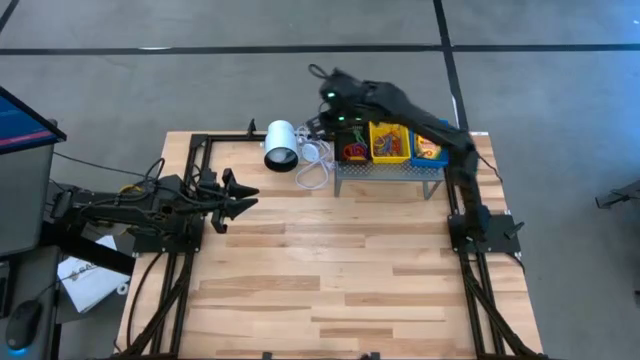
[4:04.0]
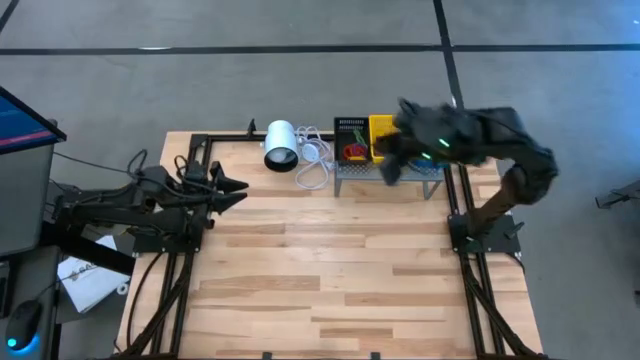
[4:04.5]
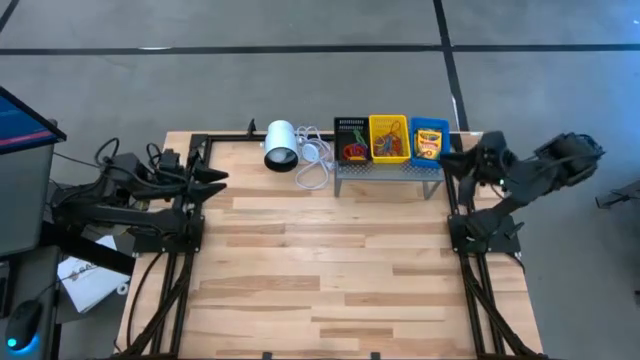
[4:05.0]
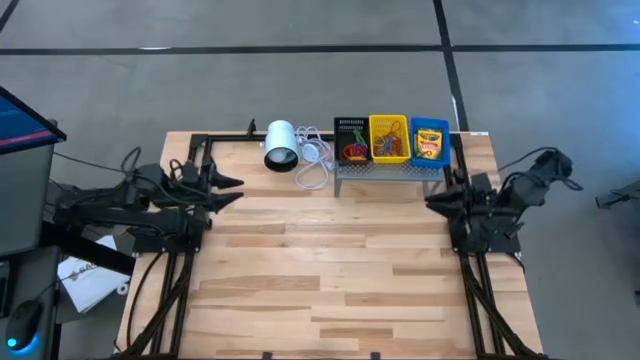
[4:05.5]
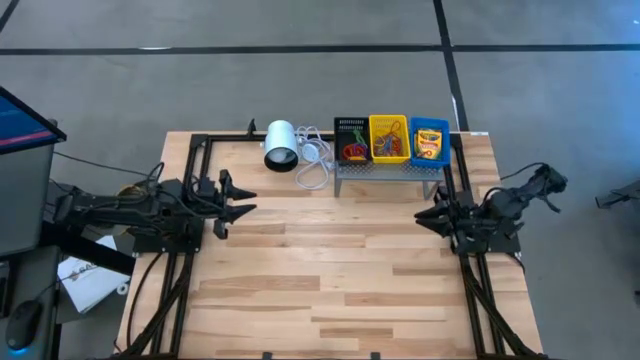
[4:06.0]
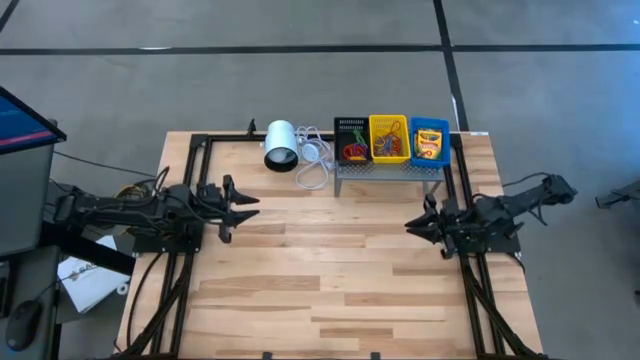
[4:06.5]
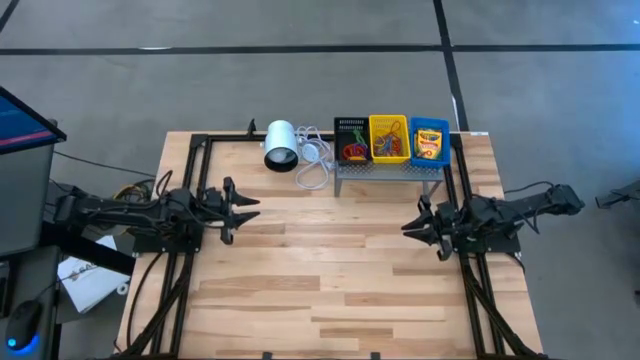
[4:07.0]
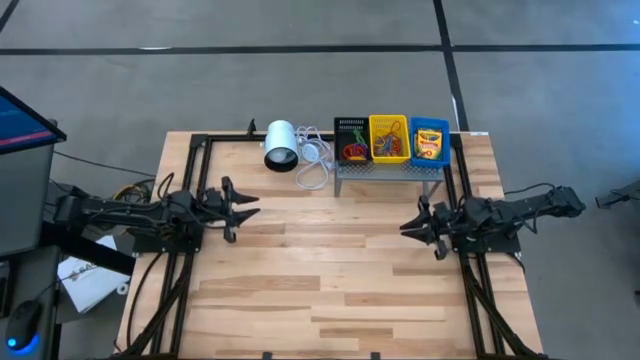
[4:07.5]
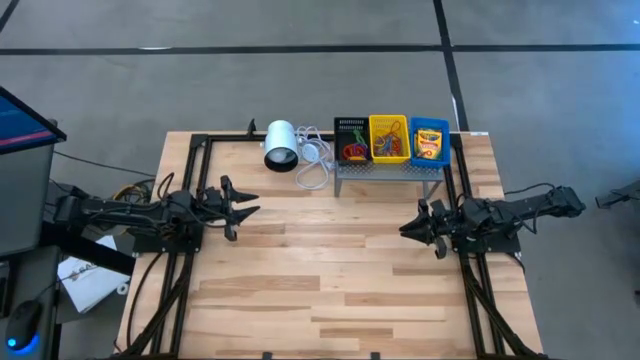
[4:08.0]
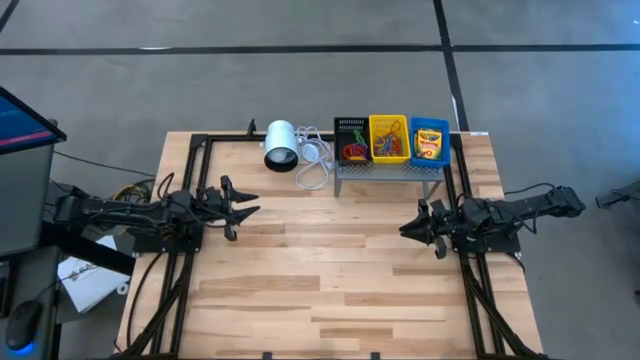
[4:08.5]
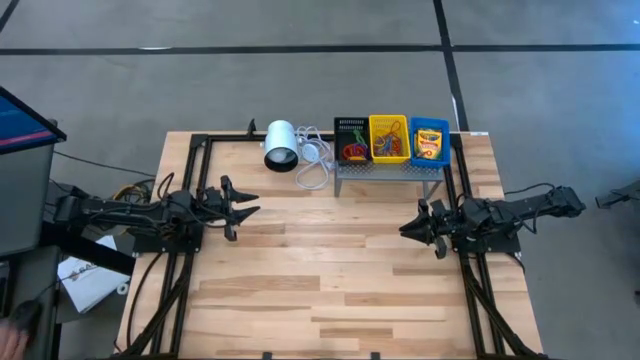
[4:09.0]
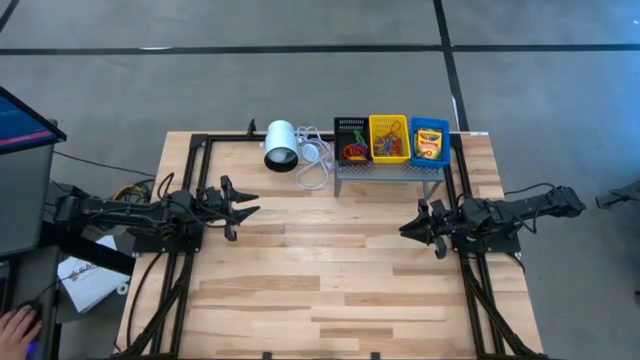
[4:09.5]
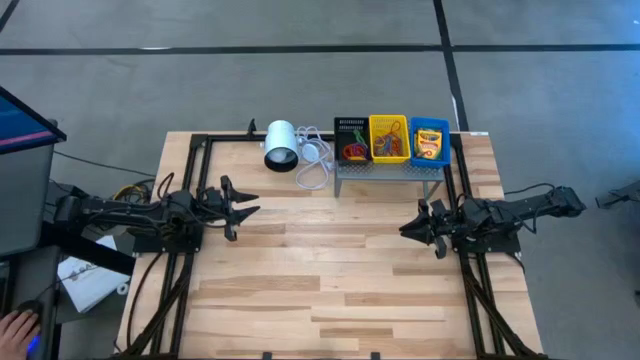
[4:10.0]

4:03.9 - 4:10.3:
Task: Pick & Place Office Desk Supplies
Return to Home Position

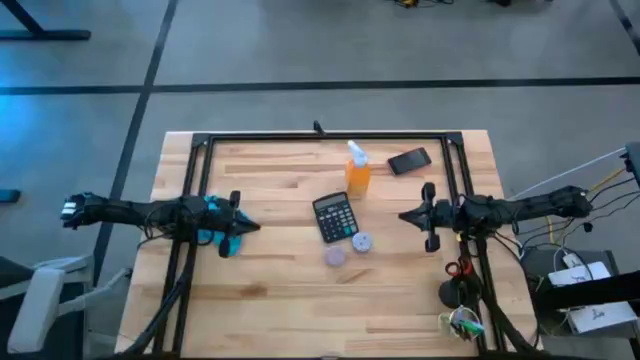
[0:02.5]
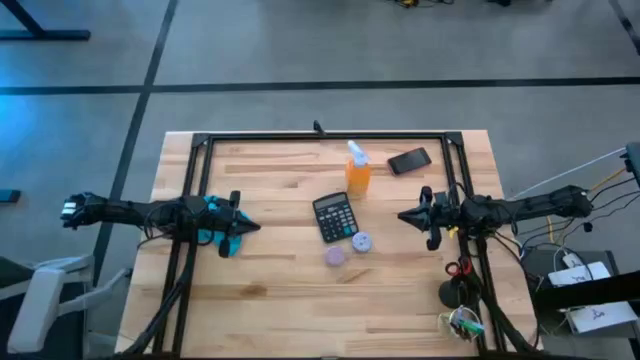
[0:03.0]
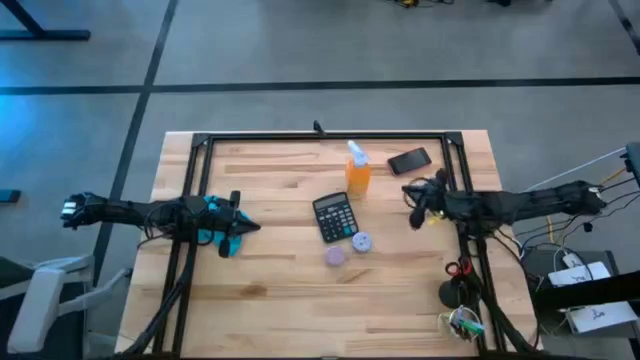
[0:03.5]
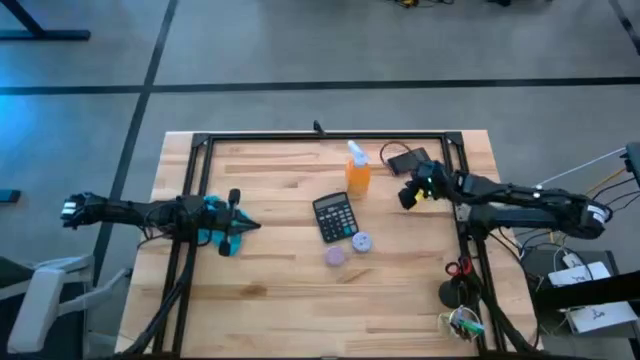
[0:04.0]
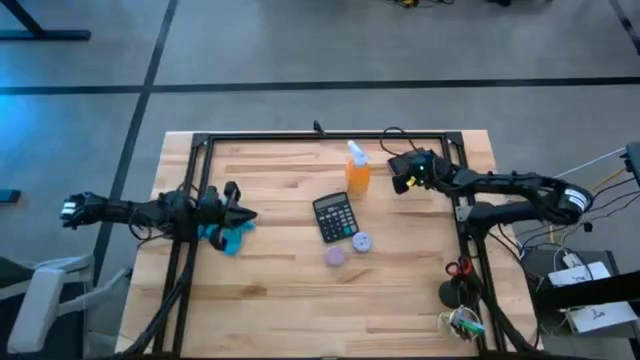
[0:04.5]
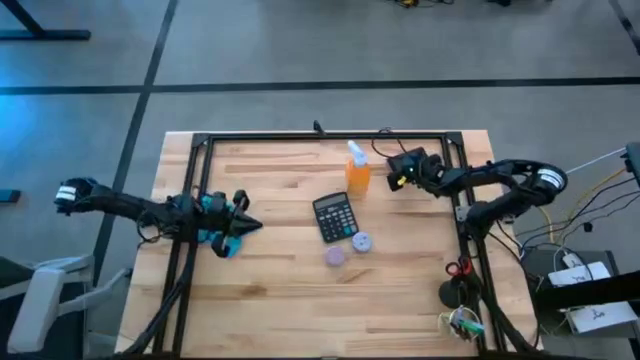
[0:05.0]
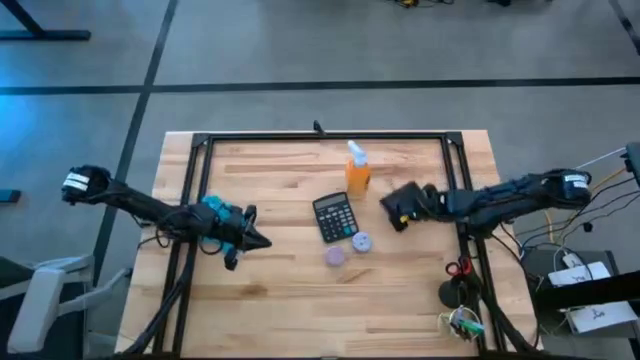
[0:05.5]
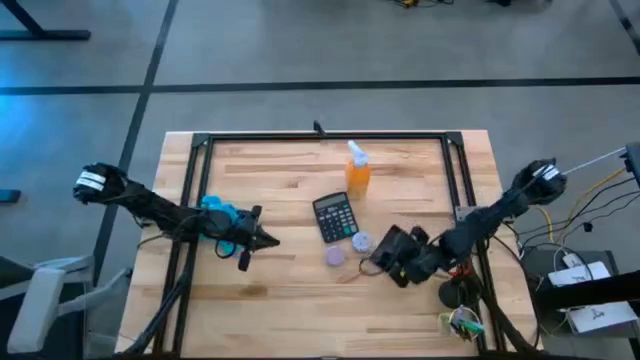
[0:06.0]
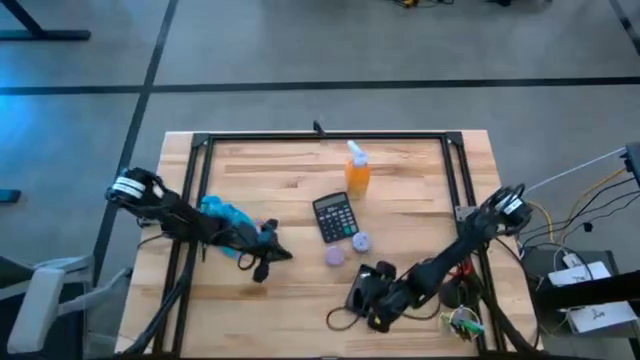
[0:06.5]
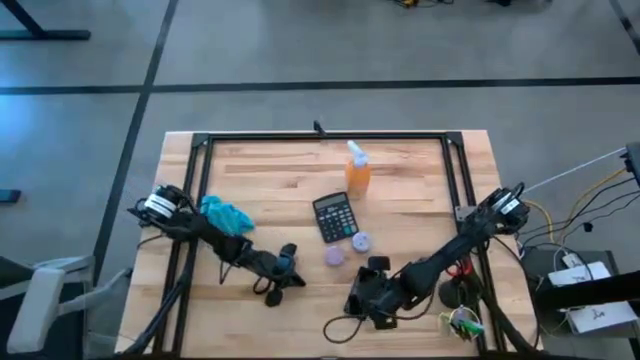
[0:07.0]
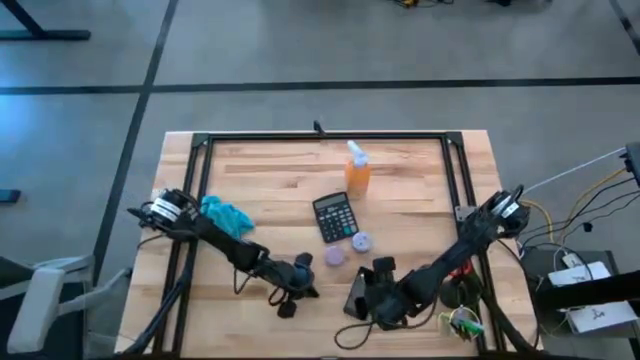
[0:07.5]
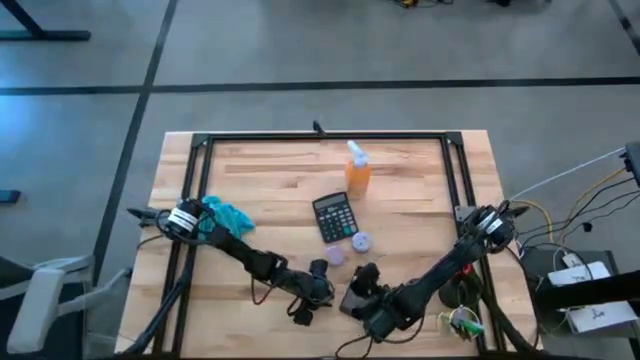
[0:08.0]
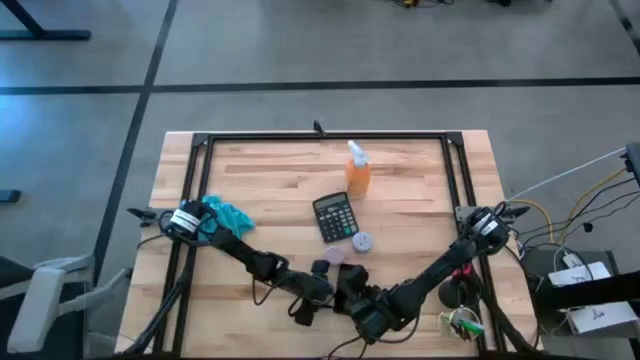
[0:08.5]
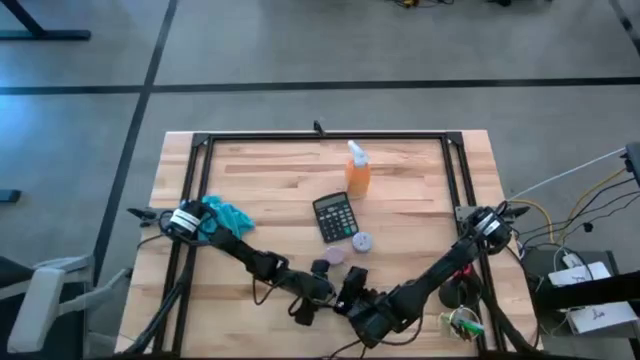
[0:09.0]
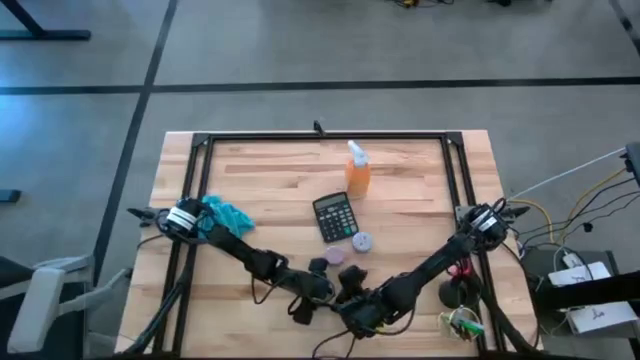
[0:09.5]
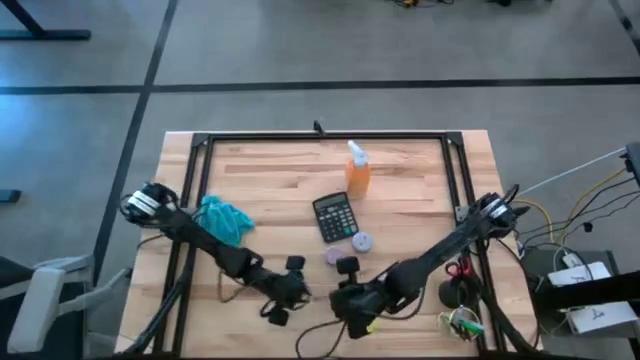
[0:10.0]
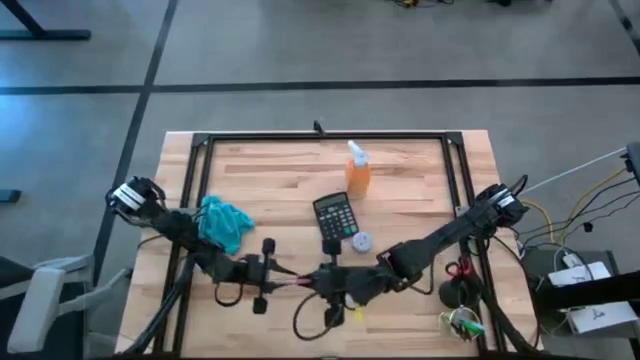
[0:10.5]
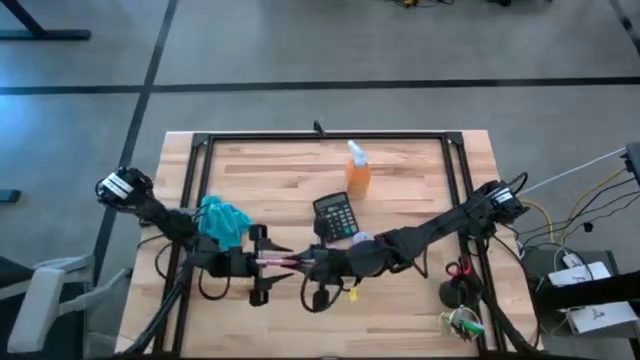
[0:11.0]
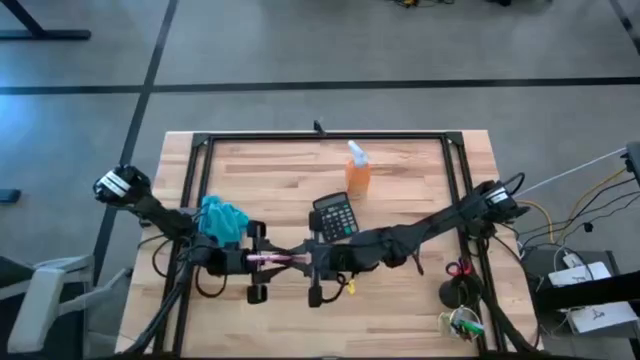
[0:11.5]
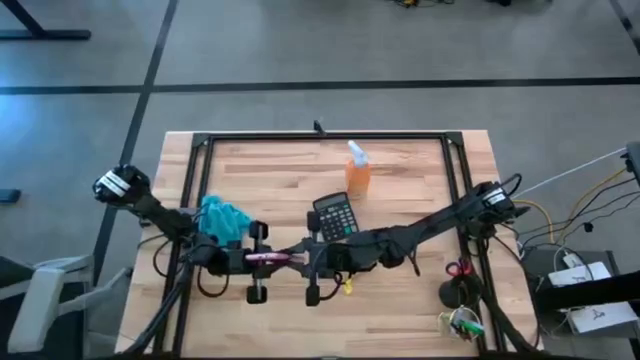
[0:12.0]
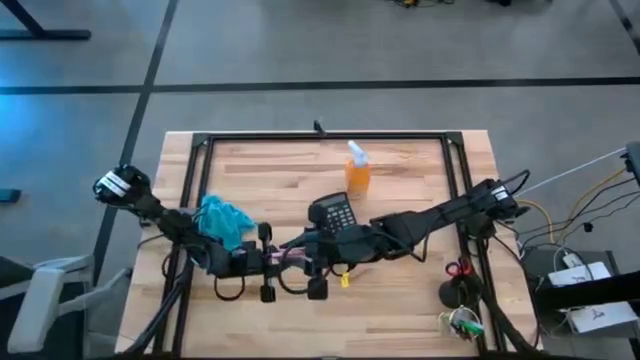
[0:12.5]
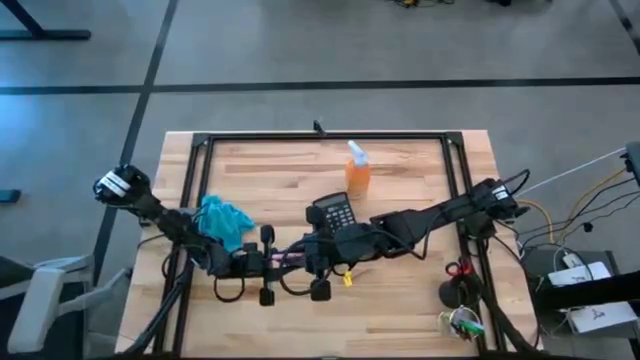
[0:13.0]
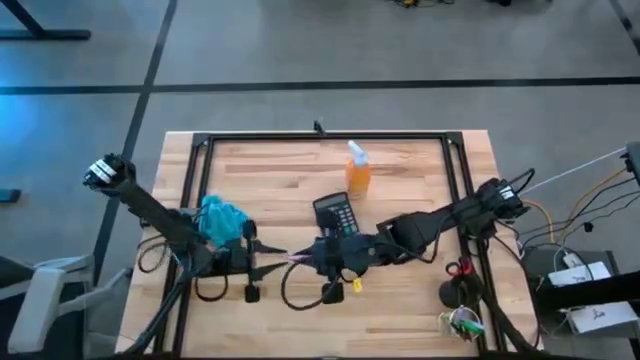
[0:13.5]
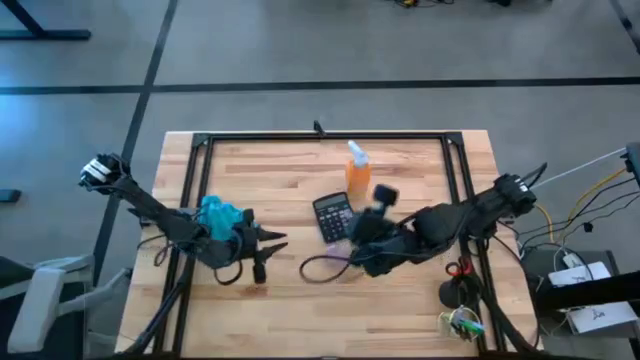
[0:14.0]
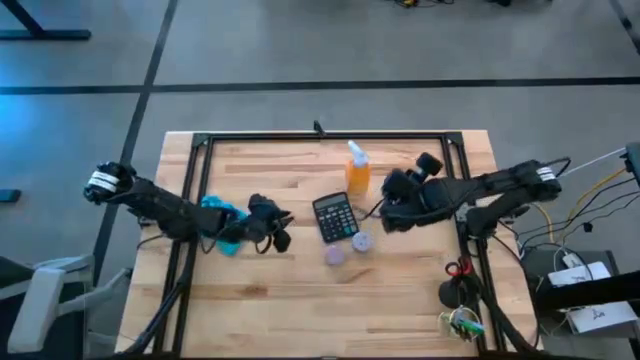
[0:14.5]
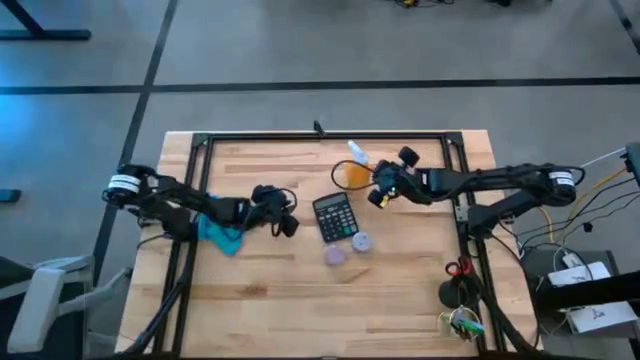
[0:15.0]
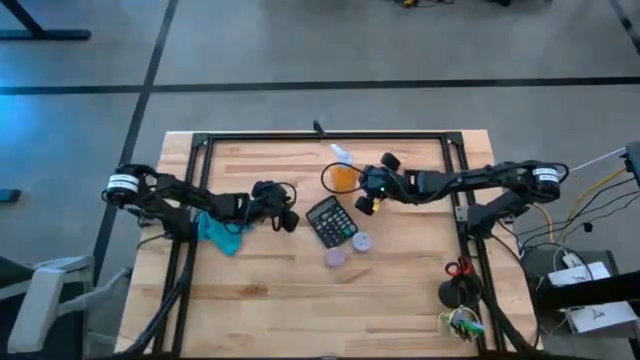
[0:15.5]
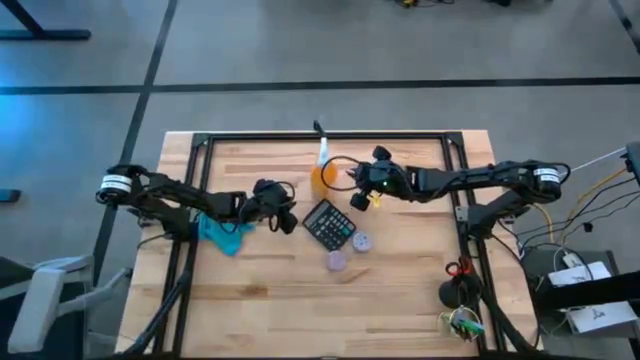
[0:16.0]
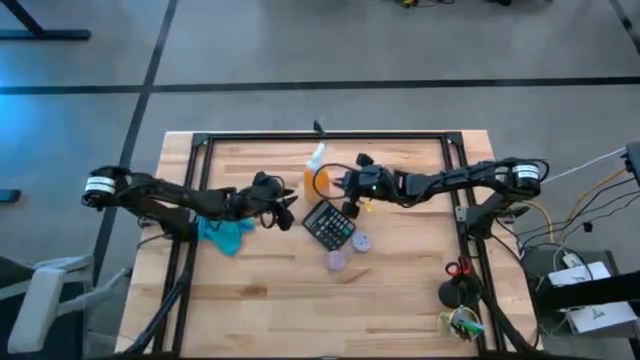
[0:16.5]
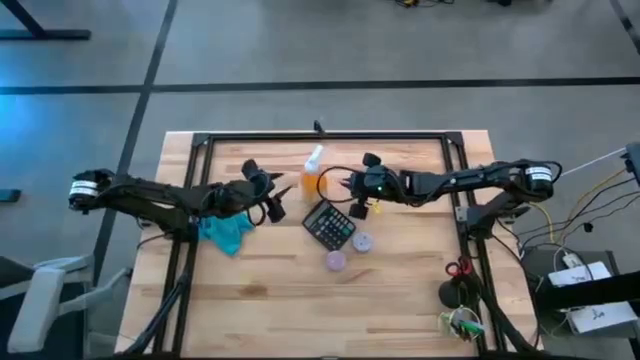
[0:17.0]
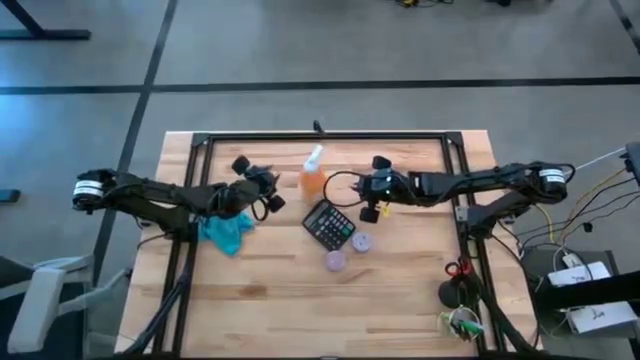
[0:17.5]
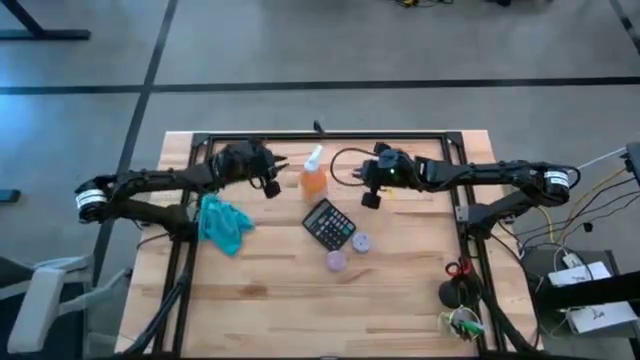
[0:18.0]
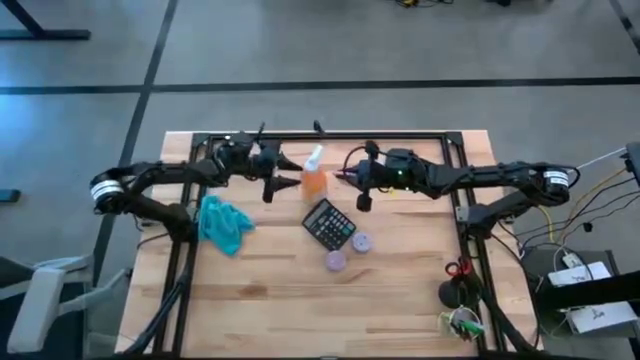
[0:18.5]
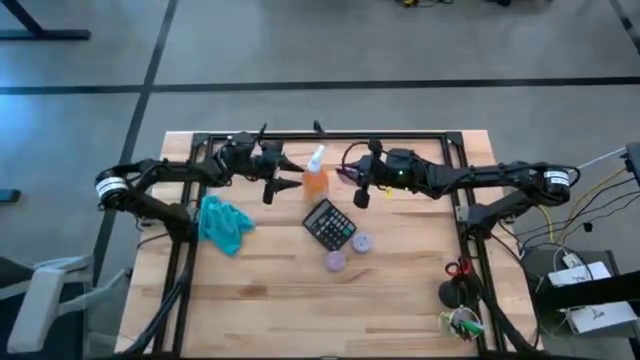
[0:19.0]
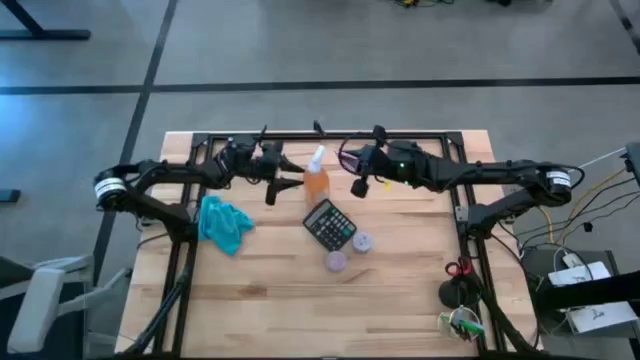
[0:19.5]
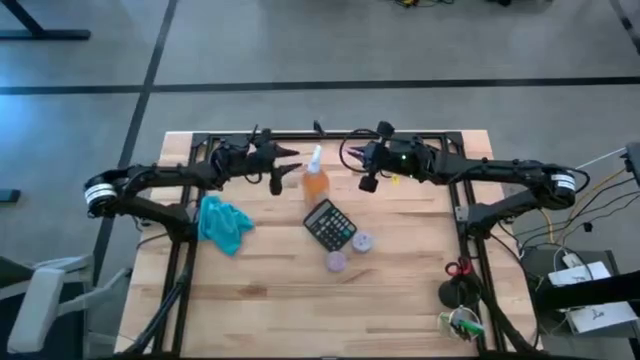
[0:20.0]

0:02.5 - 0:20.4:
Task: Apply microfiber cloth
Spray the back and front of the pink cellphone using the orange spray bottle
